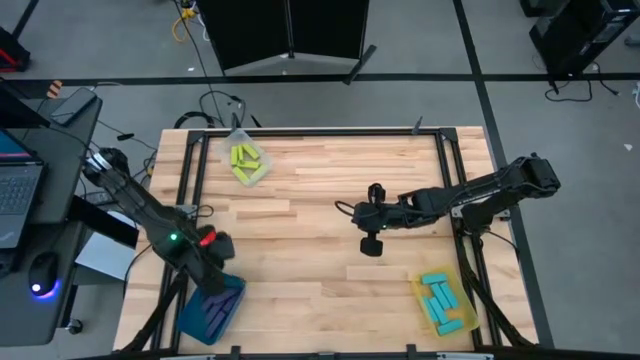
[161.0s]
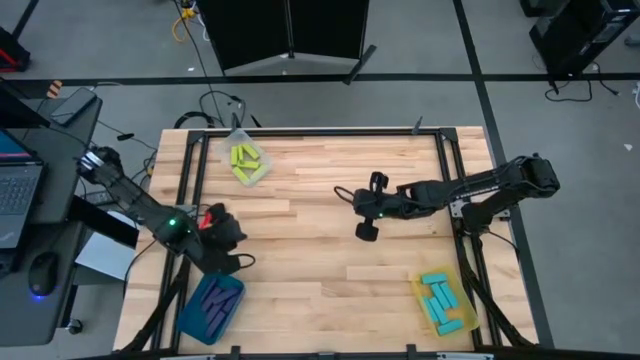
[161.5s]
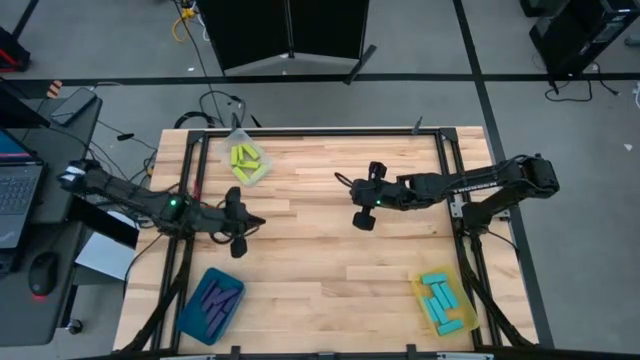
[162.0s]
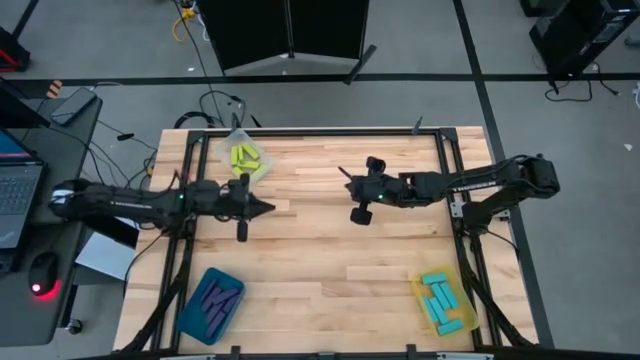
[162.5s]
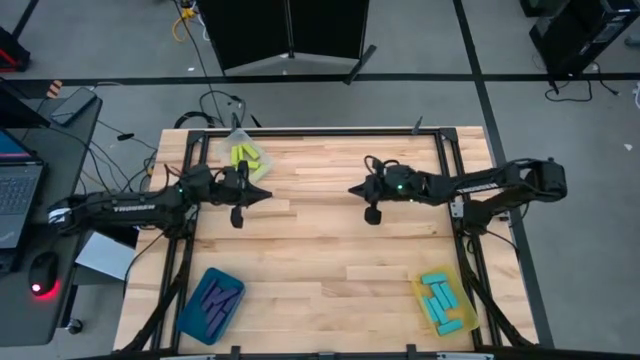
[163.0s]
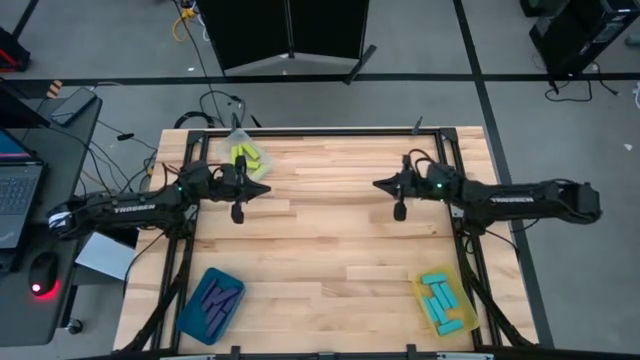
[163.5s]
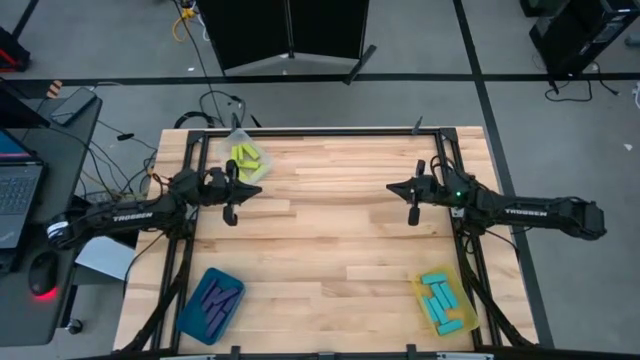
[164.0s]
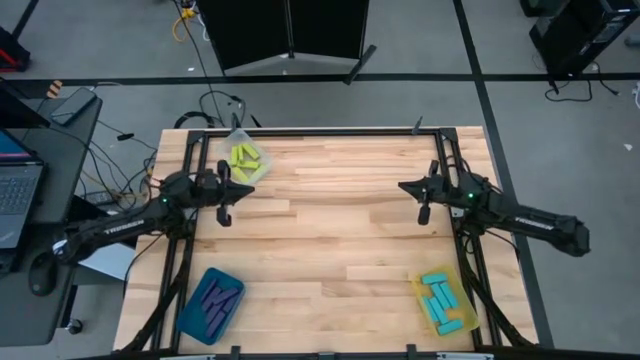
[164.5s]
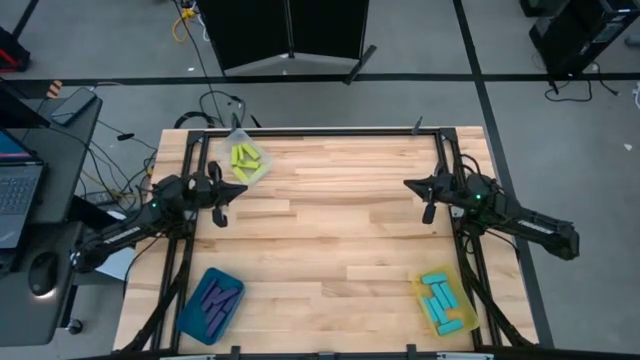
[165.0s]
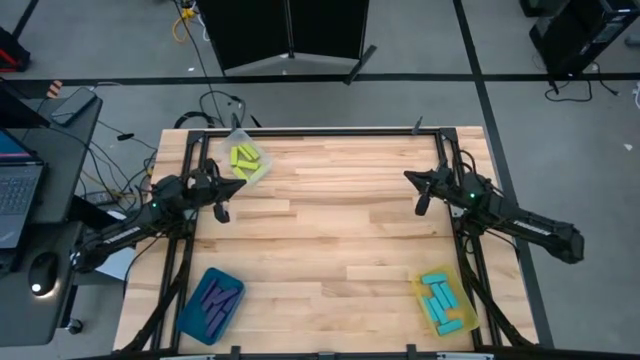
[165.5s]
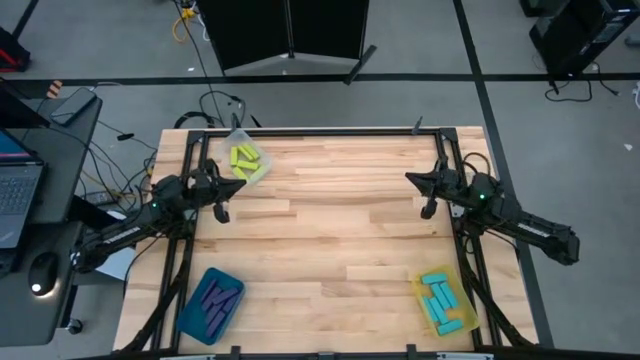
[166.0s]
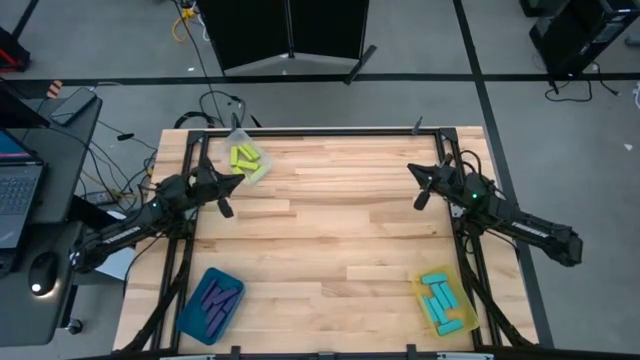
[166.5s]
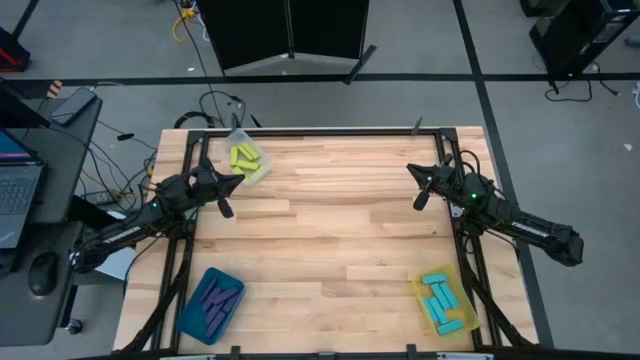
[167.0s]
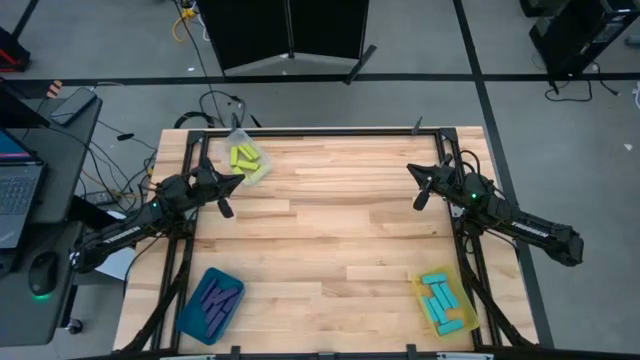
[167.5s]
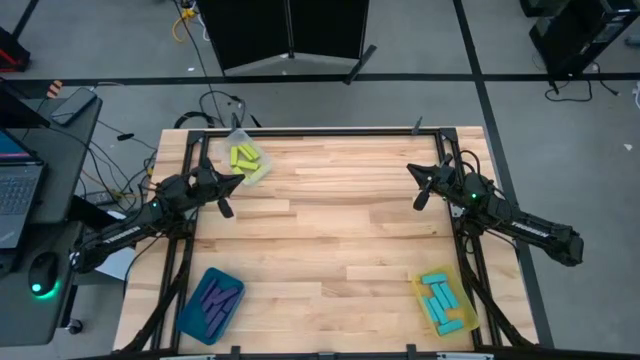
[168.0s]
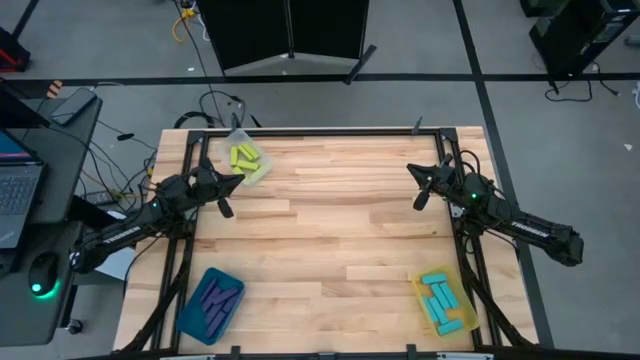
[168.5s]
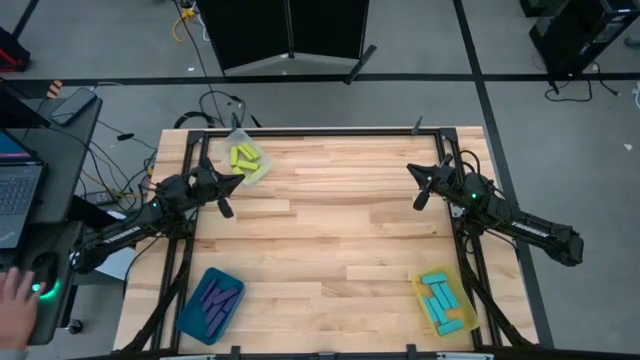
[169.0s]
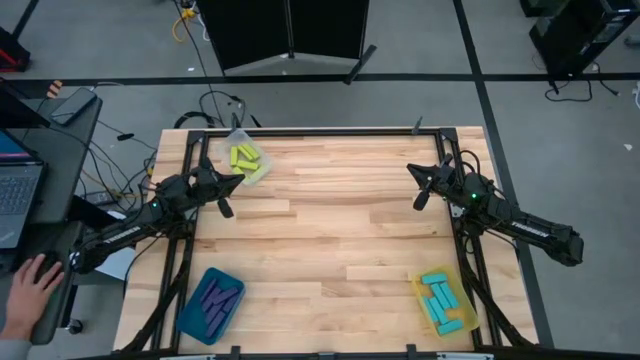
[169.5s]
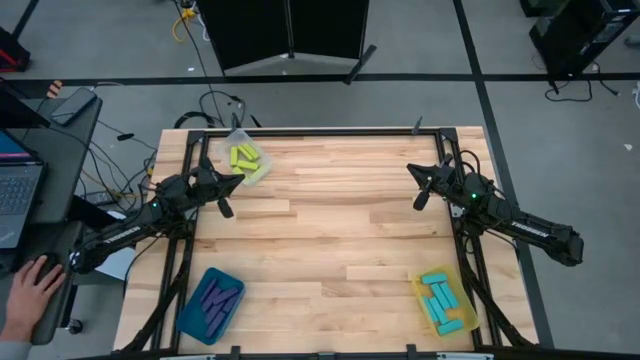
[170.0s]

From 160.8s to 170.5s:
Task: Sort blocks
Return to Home Position

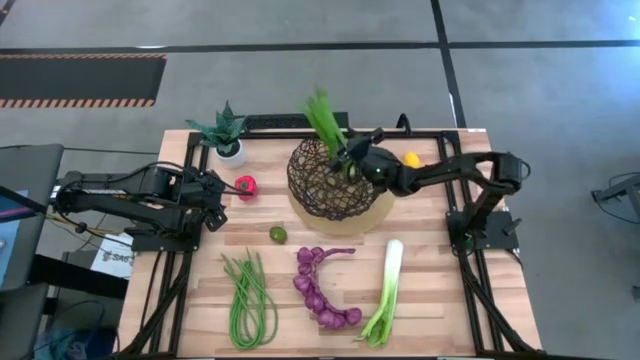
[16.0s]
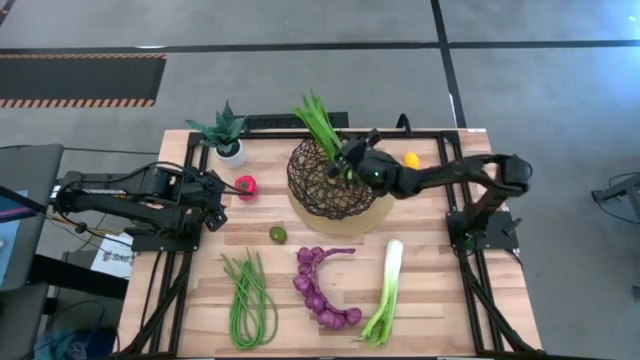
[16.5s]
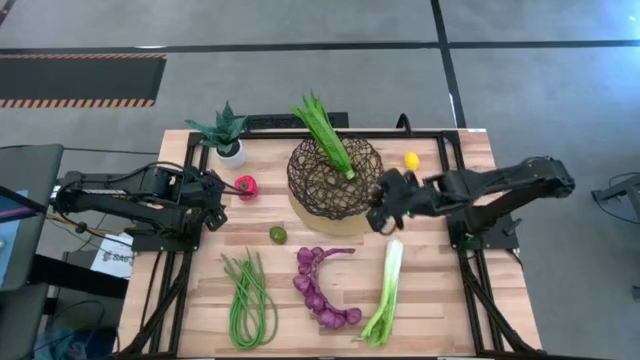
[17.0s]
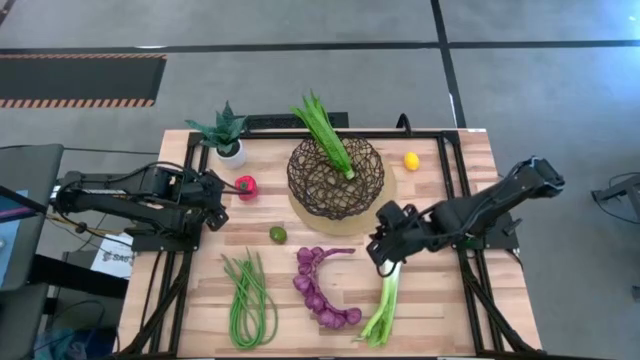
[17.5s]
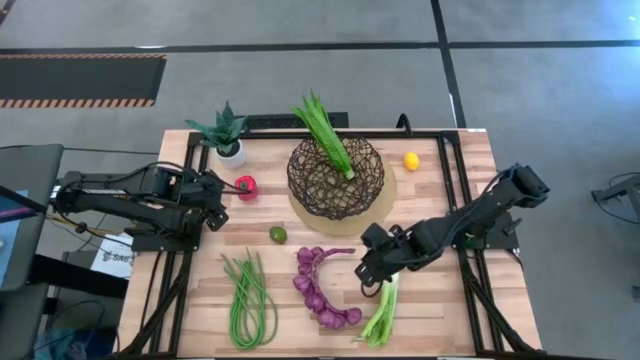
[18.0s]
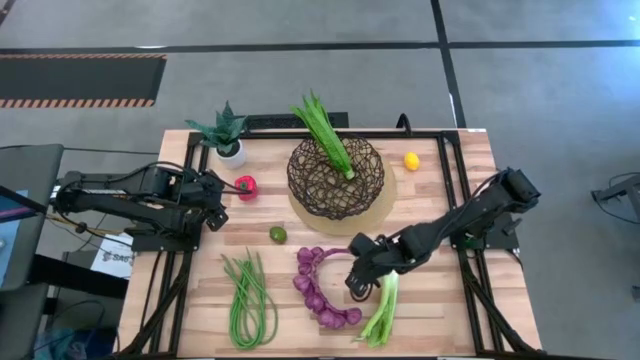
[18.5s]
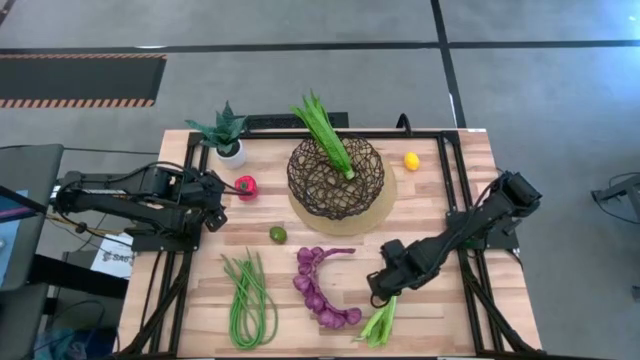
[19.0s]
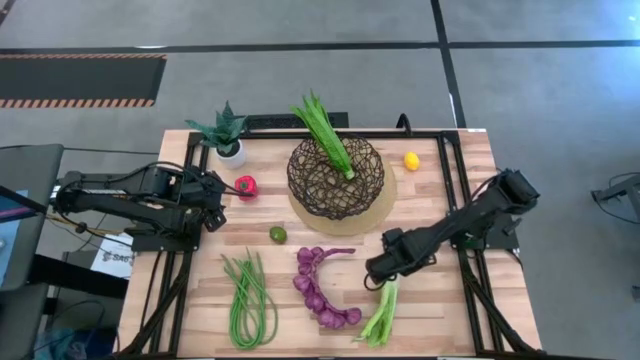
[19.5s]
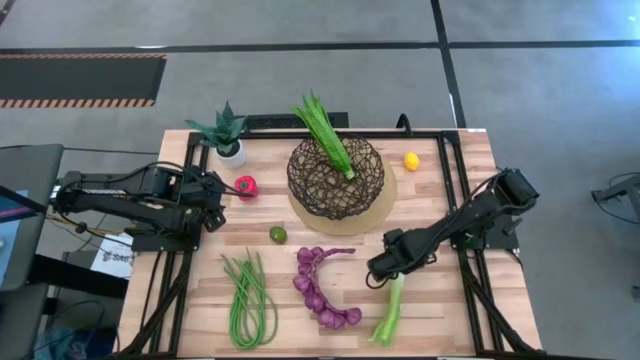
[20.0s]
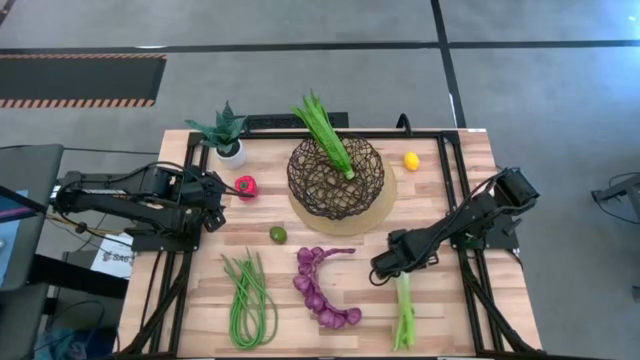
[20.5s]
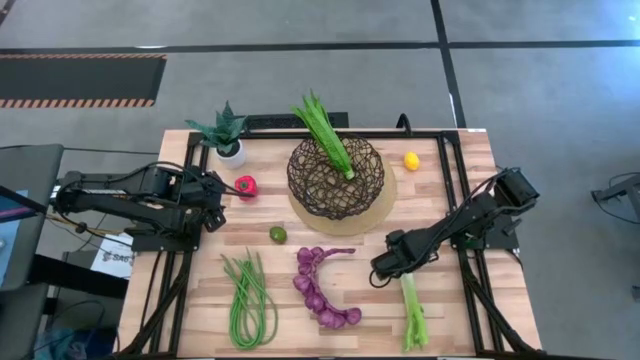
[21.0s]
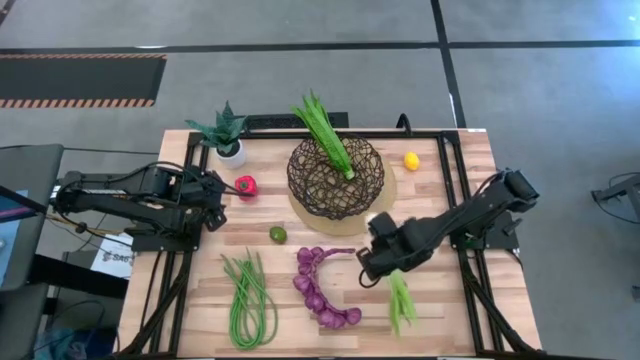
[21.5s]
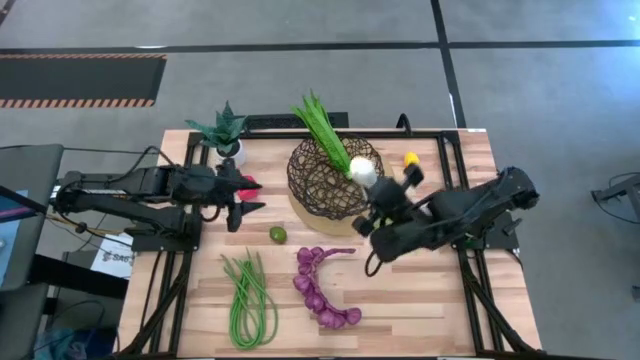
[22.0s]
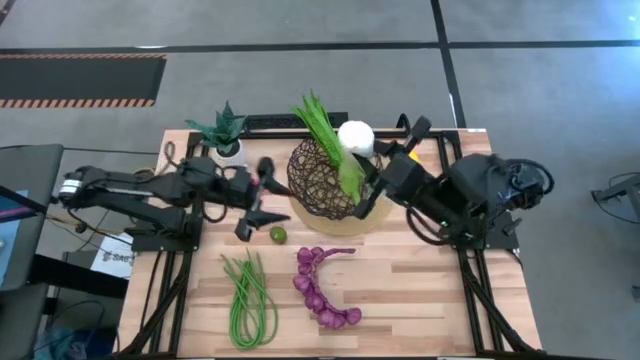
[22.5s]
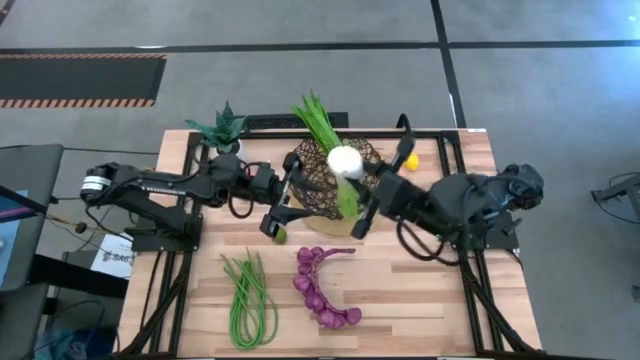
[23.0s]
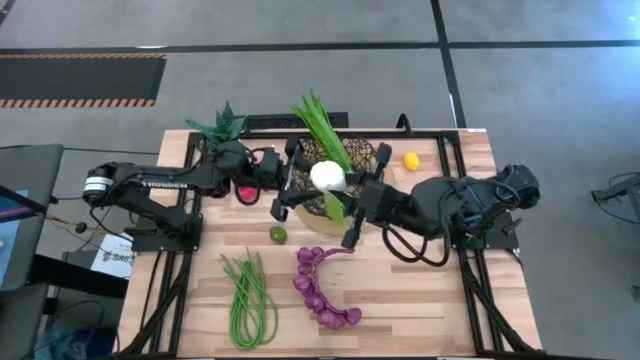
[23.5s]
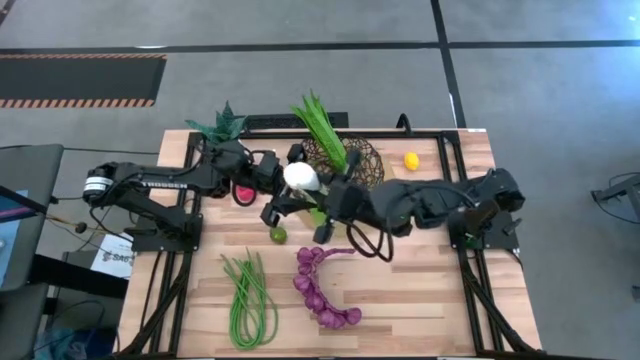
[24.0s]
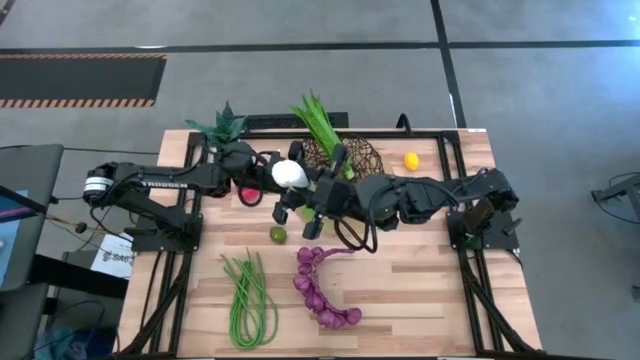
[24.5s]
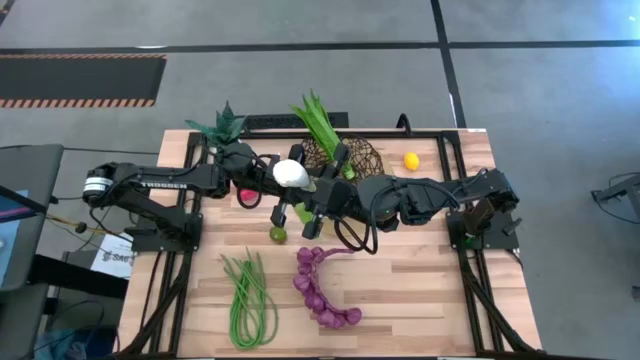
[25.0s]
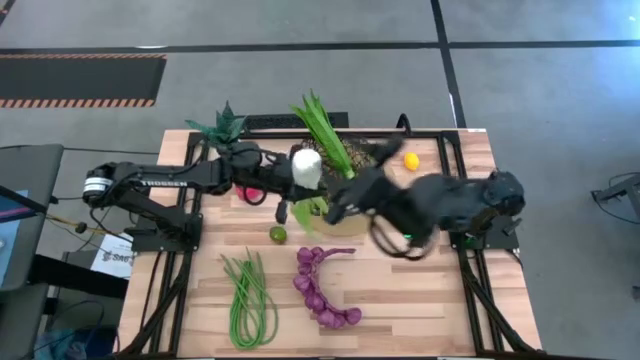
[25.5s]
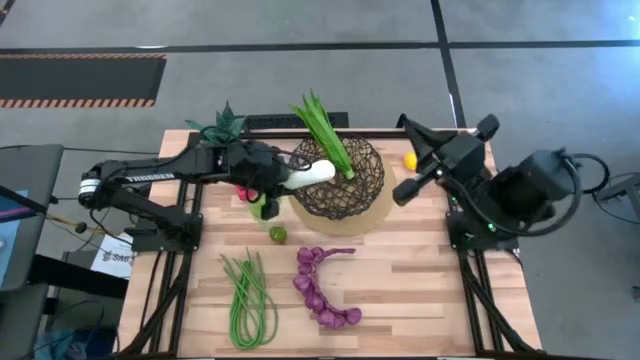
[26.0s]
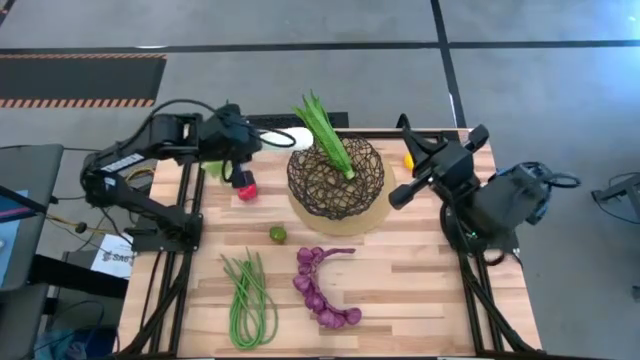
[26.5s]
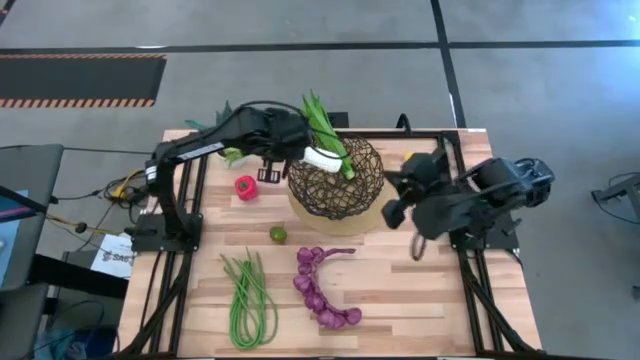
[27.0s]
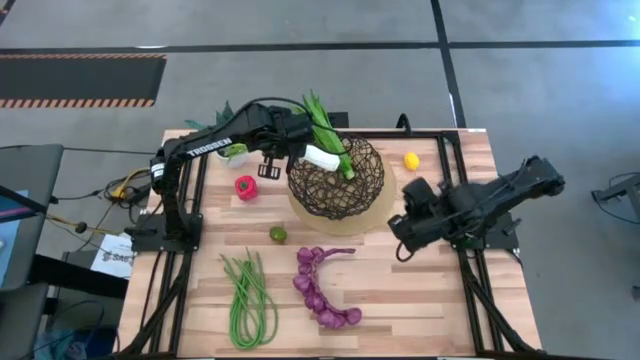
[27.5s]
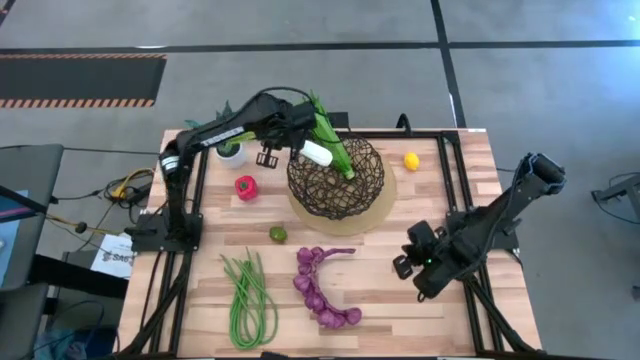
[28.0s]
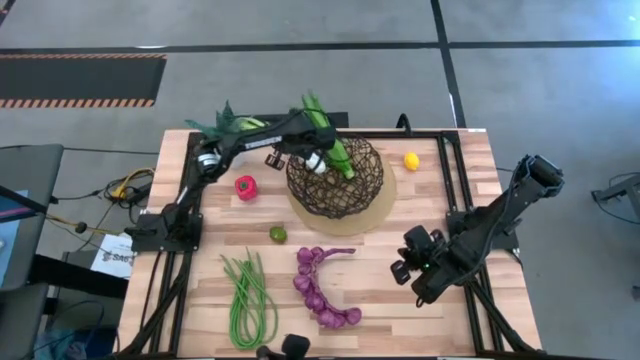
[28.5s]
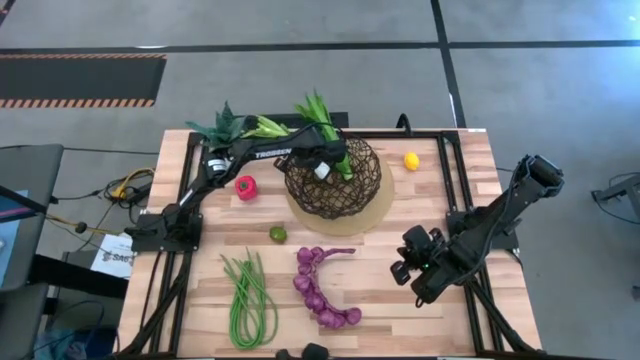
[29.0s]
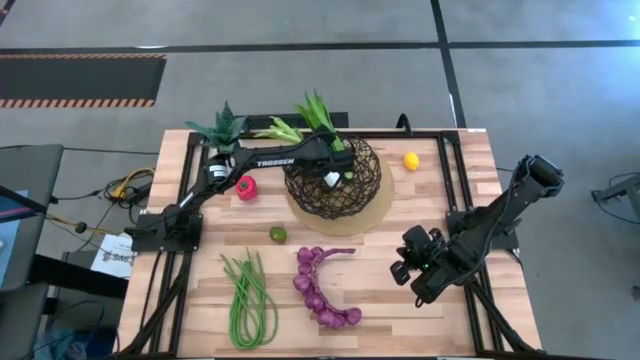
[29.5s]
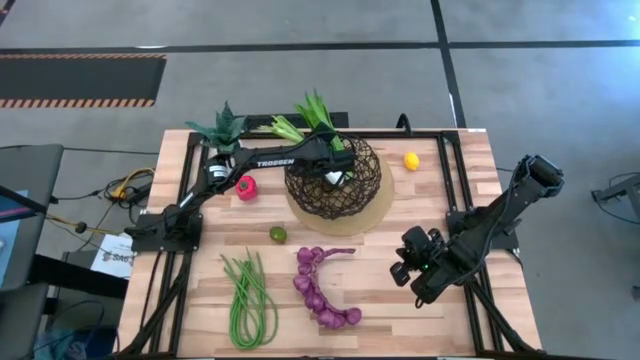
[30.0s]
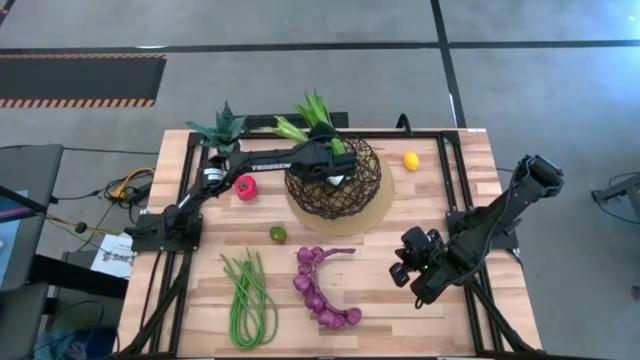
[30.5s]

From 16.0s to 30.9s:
Task: Build produce basket
Put the celery into the basket
